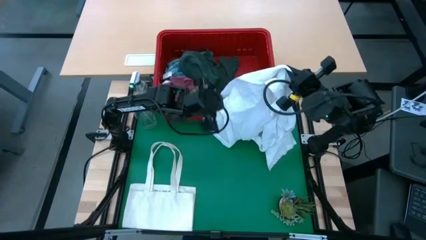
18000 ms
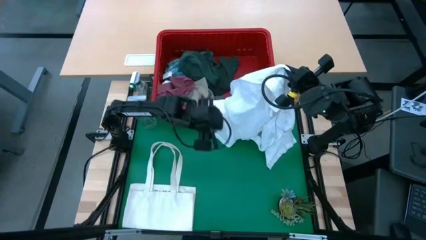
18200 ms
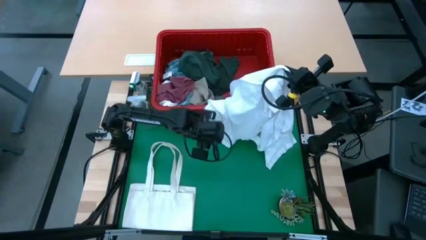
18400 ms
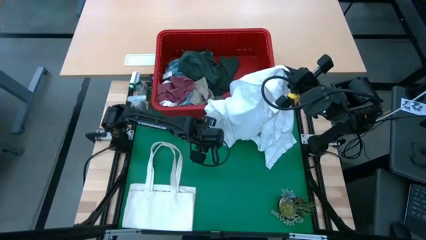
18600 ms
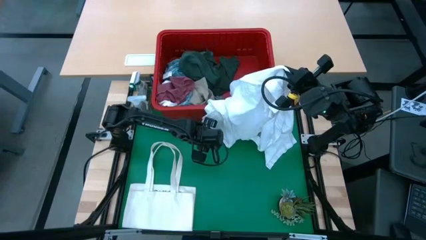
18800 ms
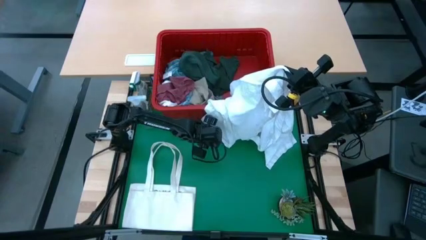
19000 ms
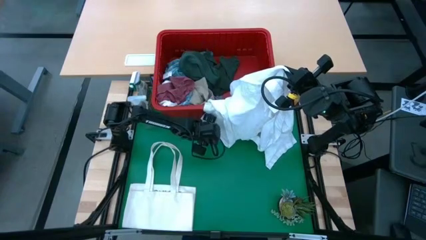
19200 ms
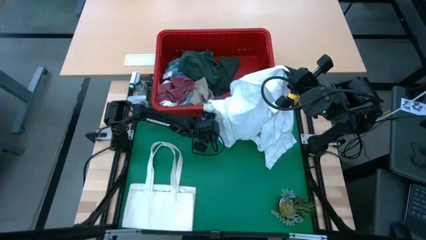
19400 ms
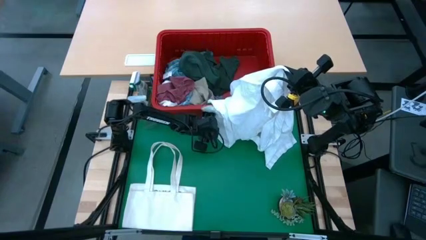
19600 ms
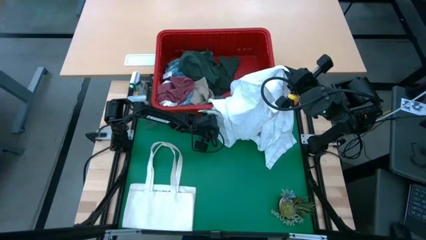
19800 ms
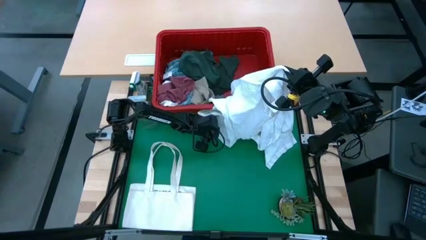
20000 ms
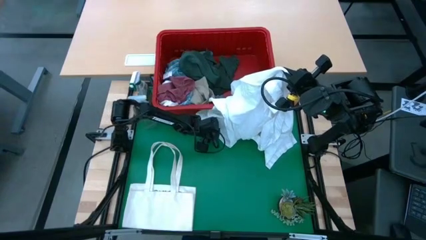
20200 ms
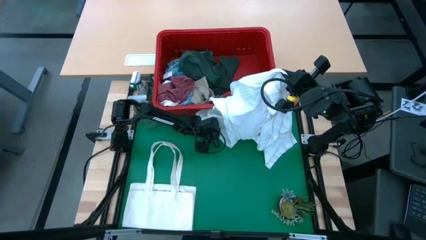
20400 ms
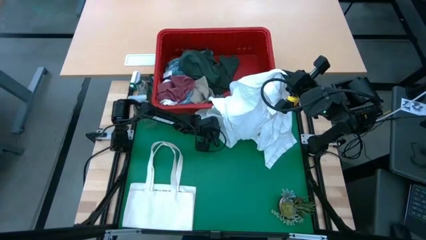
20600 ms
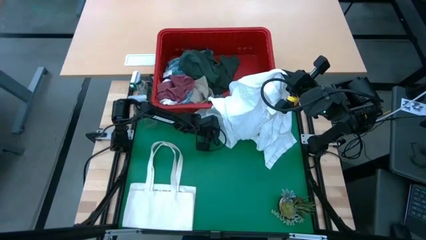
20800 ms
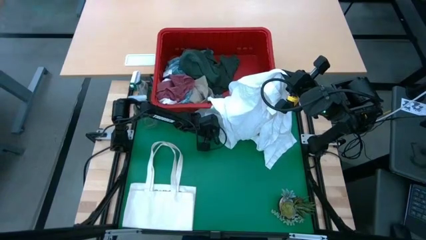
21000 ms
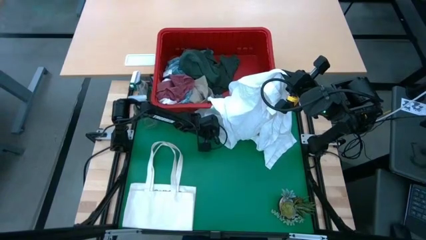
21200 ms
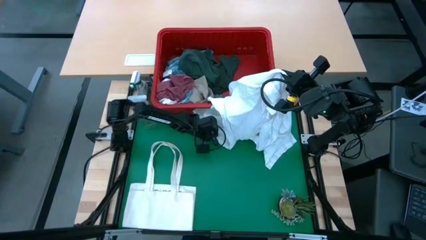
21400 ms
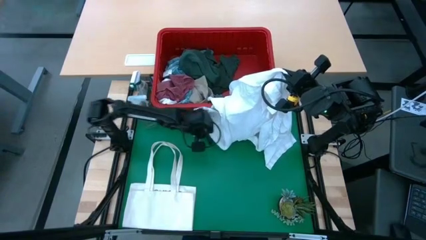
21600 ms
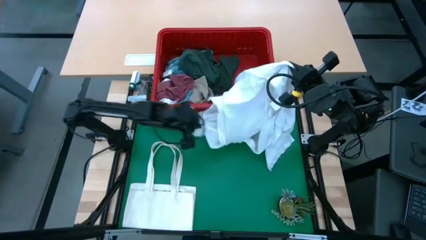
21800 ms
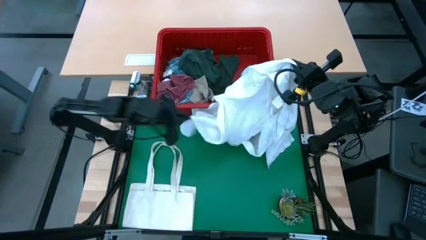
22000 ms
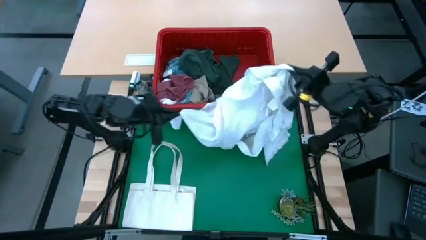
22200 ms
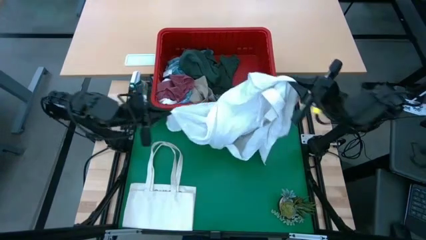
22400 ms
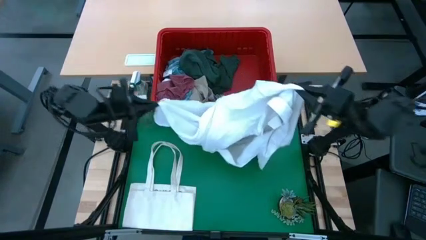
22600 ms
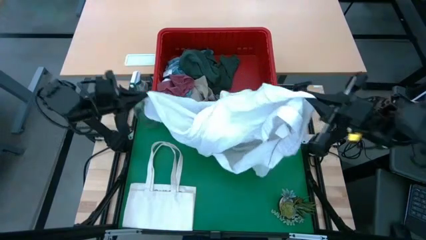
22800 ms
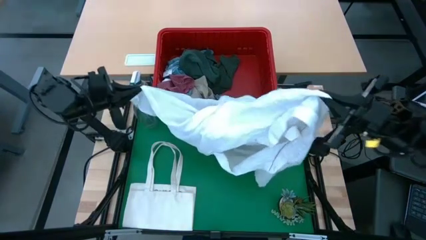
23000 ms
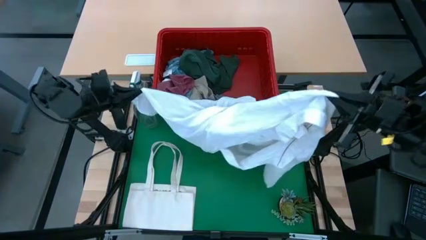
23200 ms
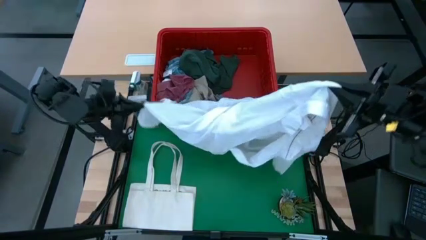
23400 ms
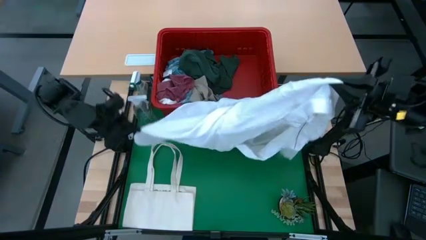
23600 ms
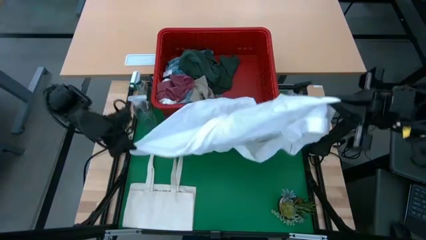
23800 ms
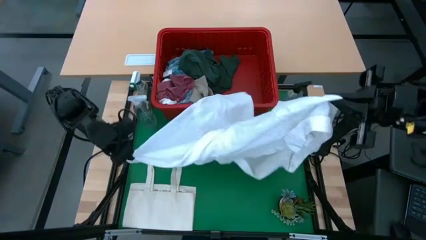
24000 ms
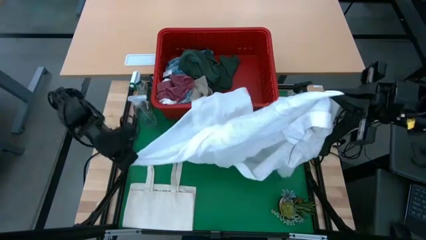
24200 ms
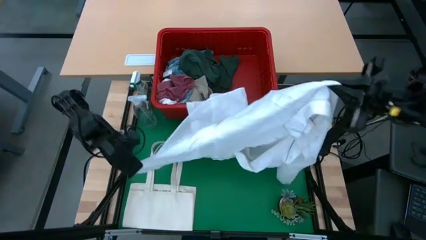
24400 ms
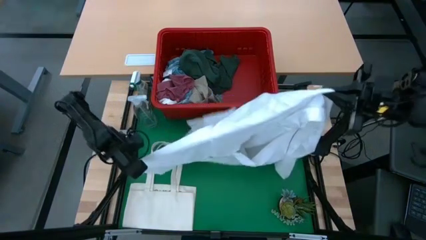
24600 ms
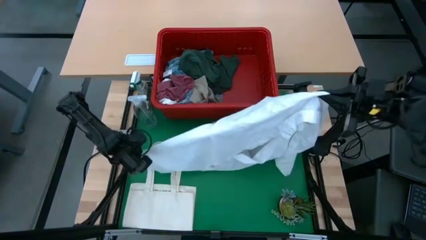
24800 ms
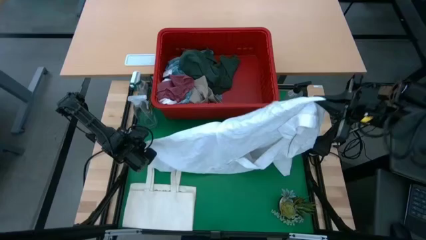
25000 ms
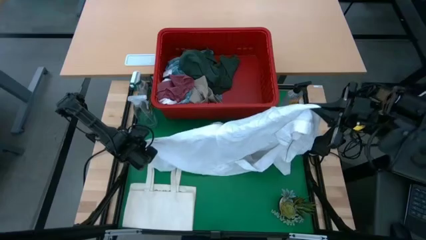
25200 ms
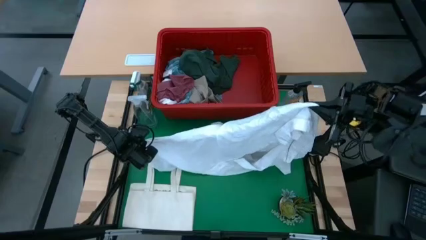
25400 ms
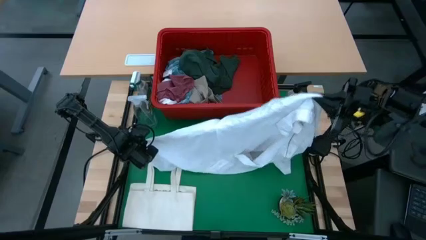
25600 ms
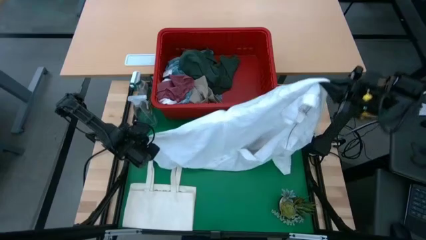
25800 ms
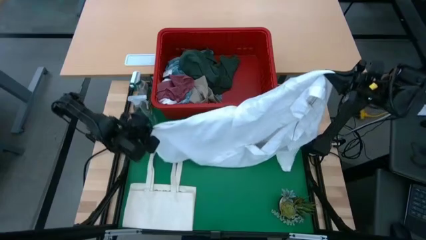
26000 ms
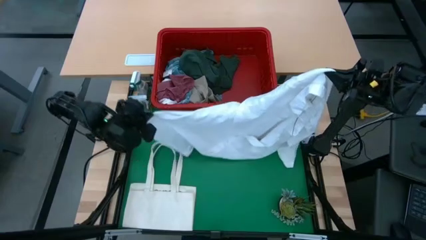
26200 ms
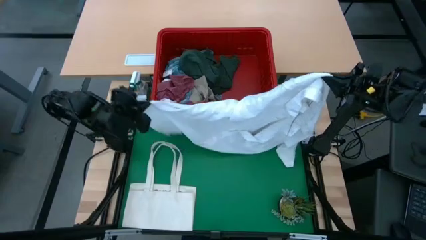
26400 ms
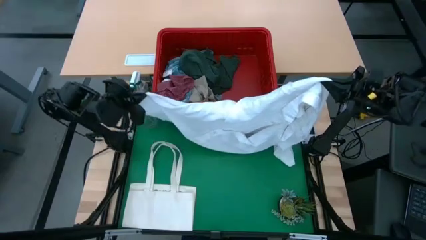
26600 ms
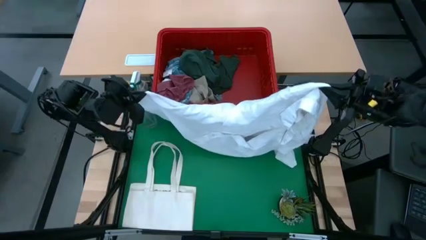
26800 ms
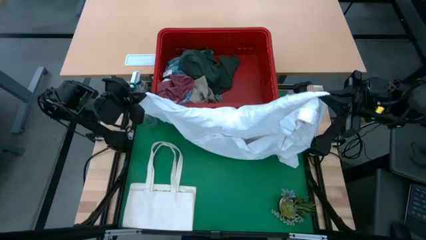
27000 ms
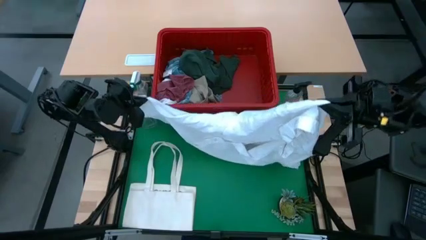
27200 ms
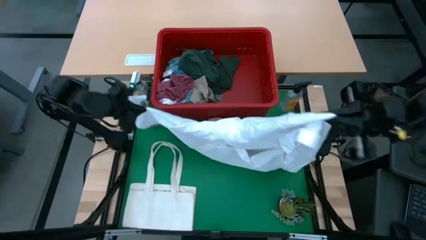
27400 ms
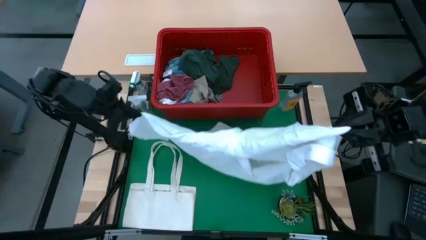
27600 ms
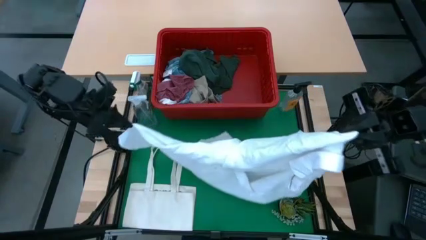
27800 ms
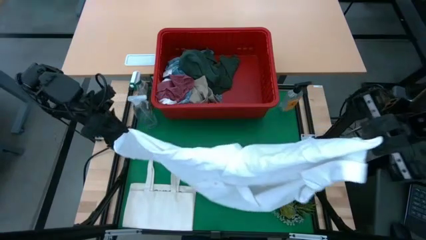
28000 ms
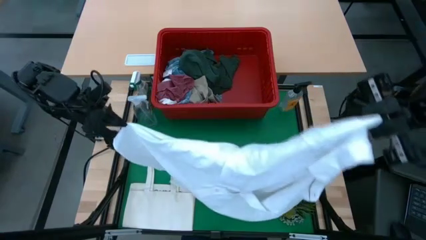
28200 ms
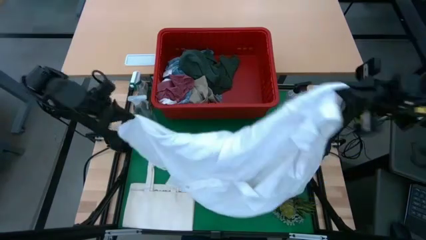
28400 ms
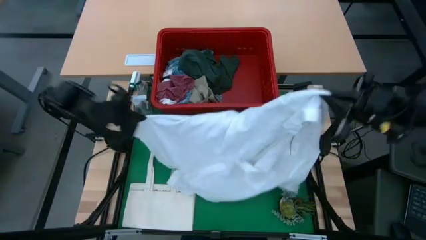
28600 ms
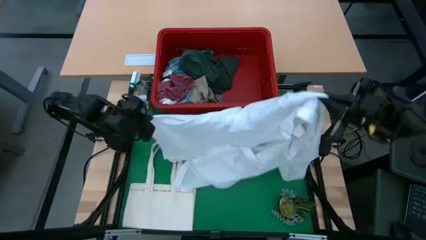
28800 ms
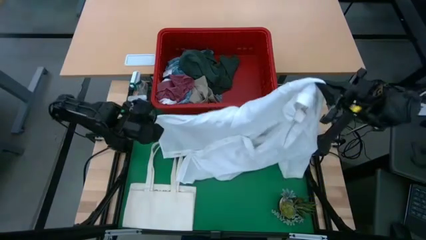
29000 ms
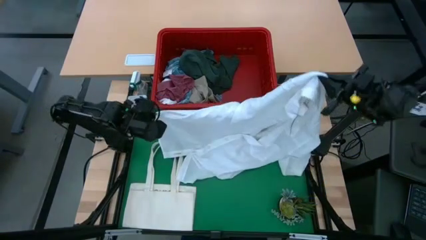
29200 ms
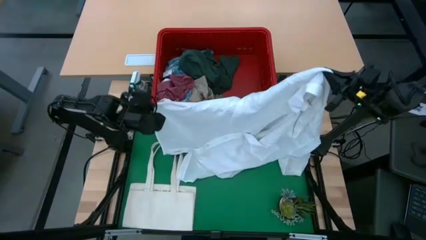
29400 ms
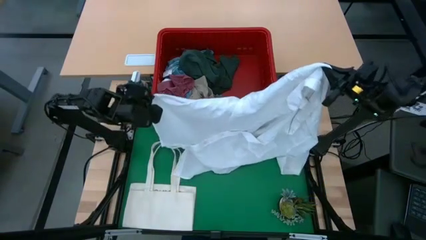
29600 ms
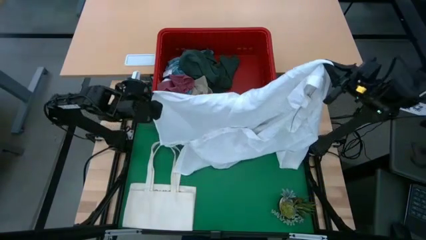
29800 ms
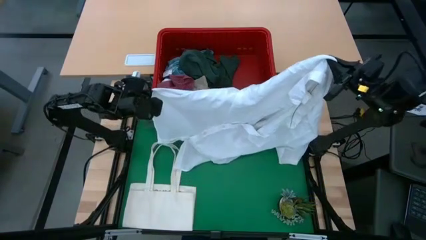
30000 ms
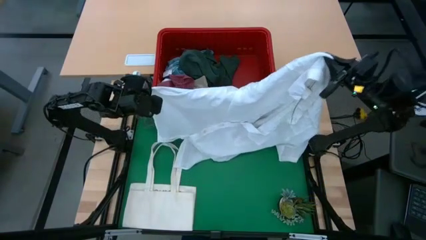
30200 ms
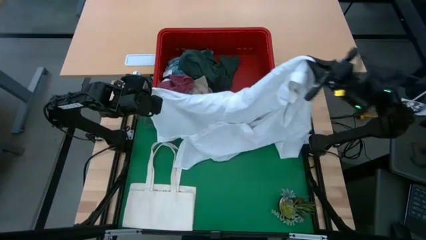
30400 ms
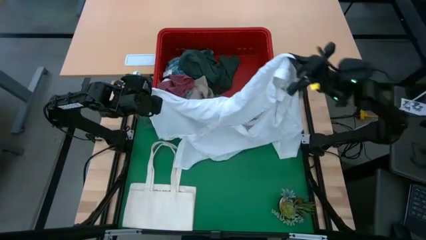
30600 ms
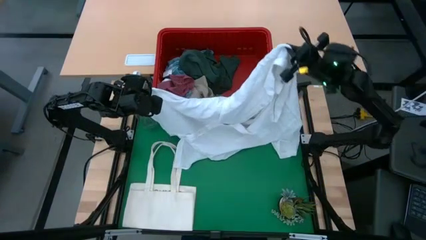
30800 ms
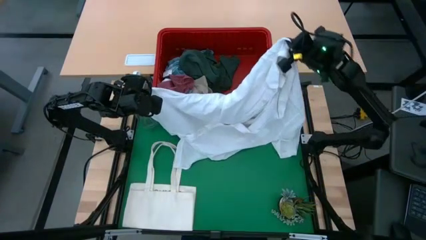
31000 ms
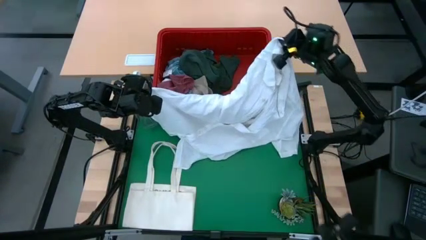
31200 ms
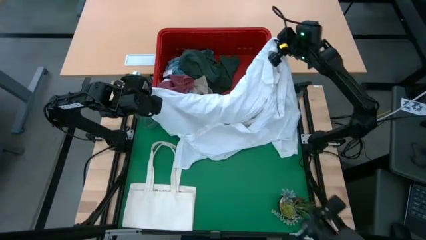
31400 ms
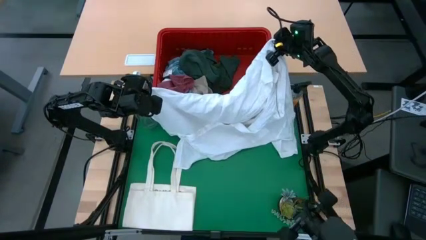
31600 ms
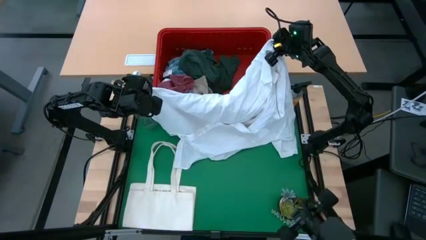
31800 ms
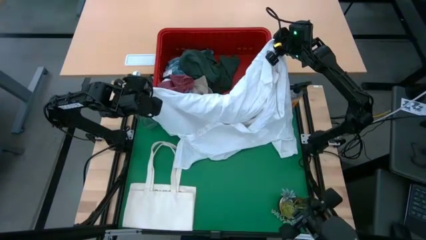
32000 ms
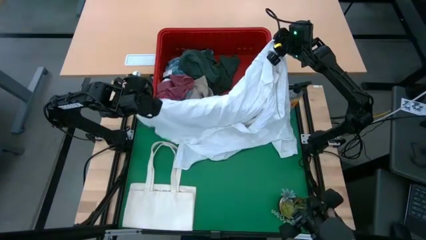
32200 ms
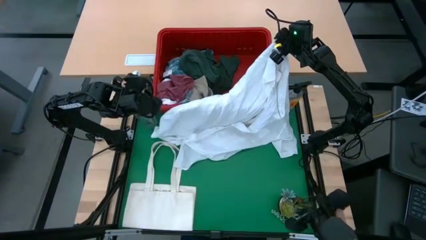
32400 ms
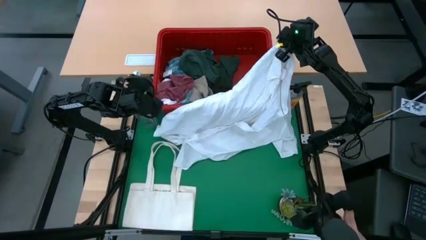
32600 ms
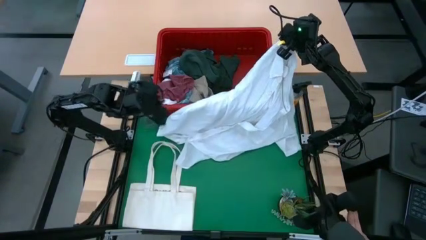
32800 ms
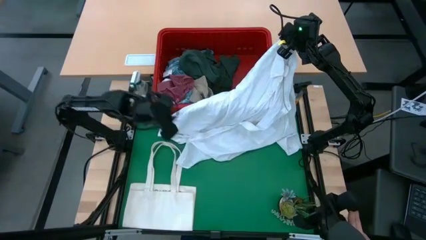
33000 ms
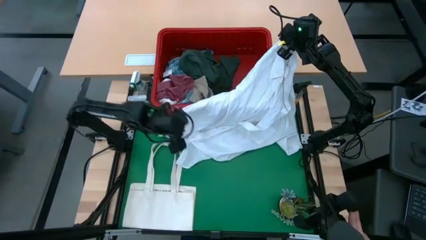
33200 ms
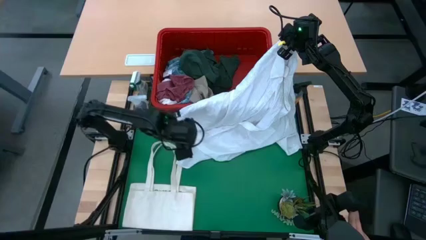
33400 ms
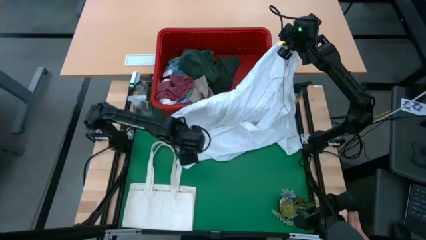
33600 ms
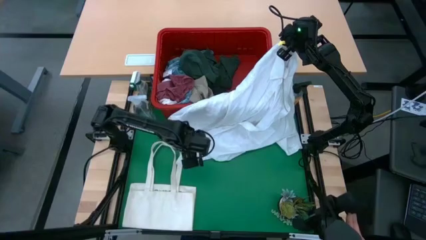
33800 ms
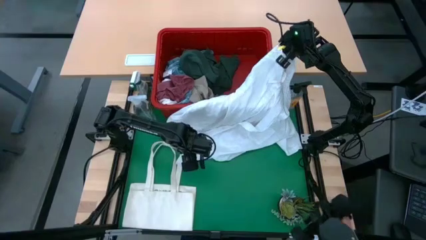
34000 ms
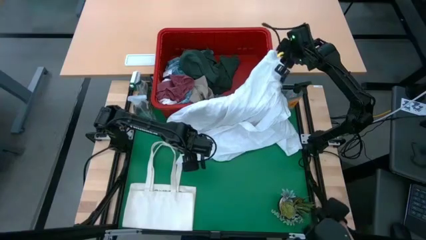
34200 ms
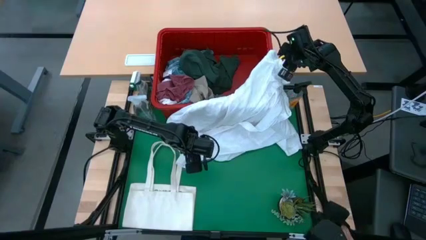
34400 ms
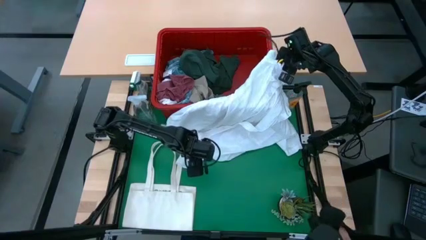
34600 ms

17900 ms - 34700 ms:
Task: Fold Laundry from Bin
Fold the white polo shirt
